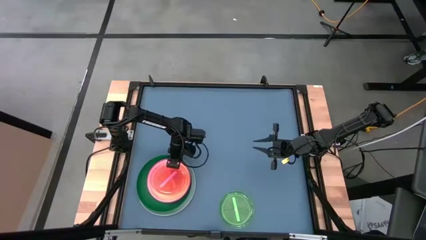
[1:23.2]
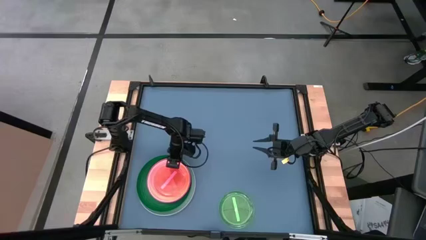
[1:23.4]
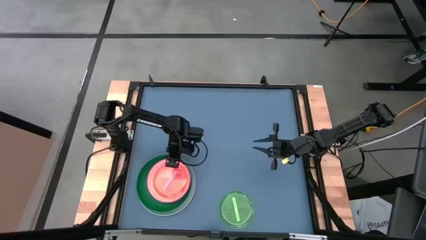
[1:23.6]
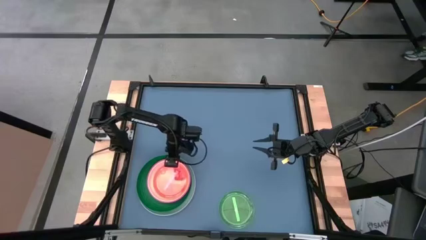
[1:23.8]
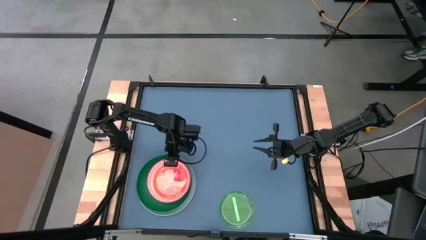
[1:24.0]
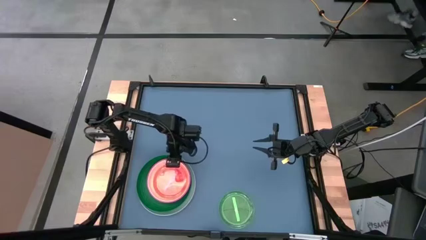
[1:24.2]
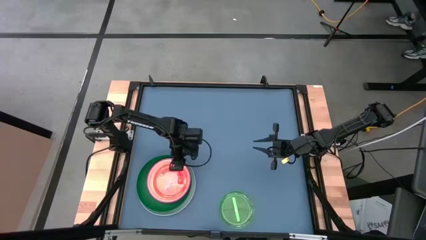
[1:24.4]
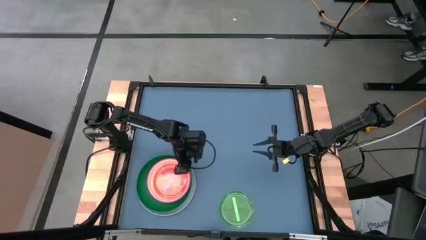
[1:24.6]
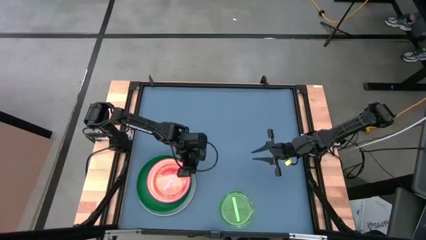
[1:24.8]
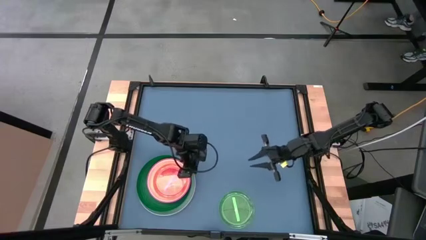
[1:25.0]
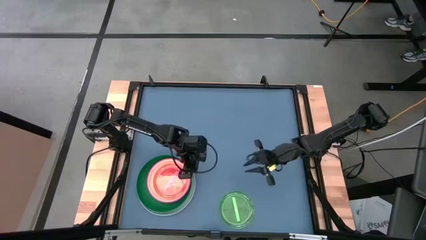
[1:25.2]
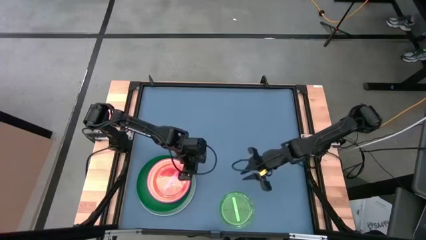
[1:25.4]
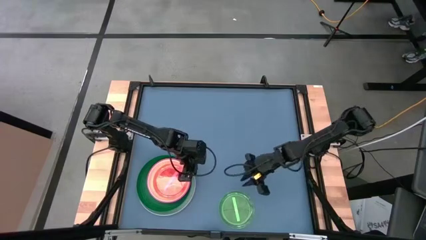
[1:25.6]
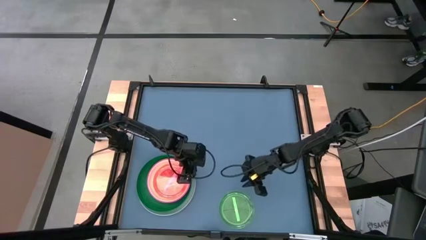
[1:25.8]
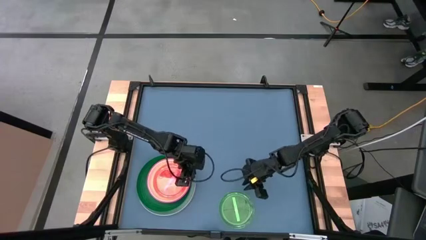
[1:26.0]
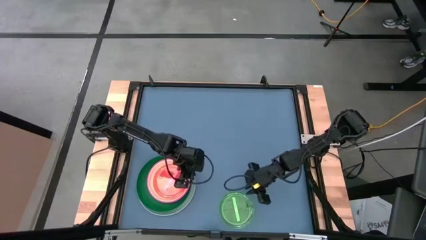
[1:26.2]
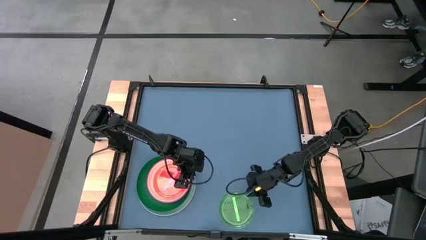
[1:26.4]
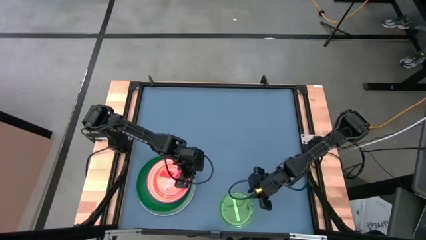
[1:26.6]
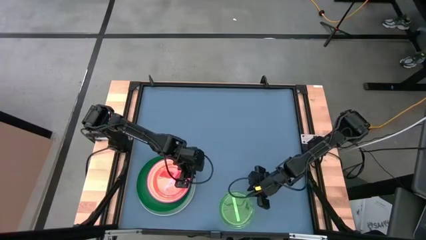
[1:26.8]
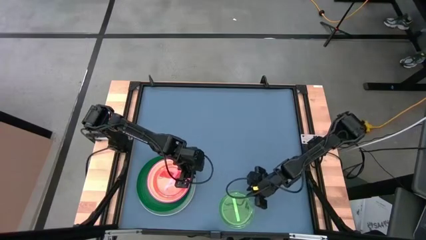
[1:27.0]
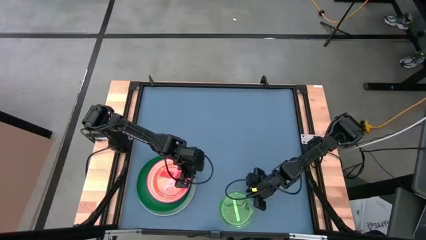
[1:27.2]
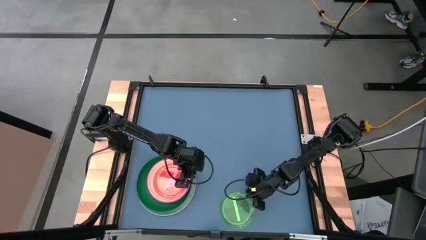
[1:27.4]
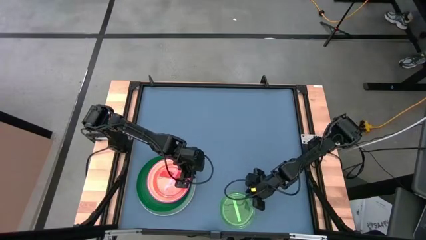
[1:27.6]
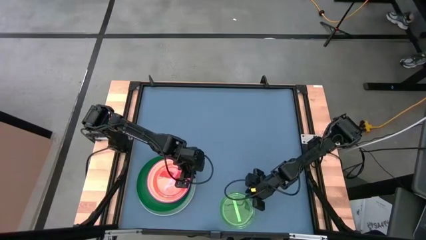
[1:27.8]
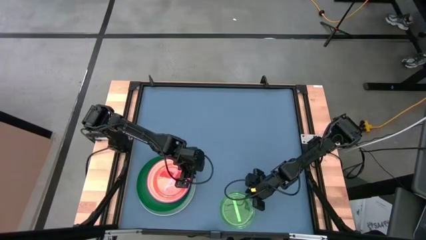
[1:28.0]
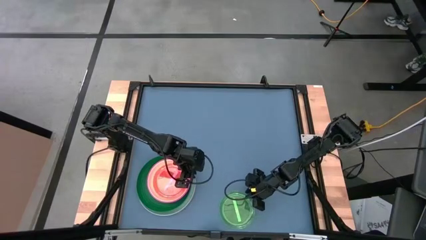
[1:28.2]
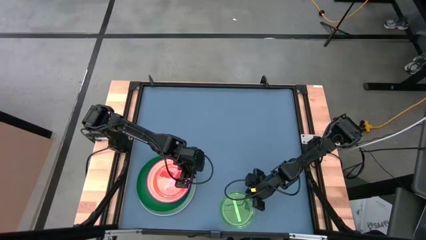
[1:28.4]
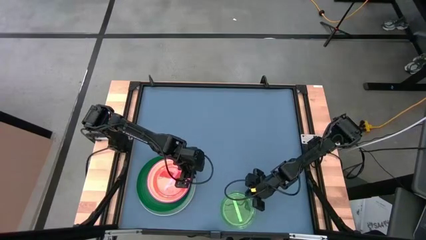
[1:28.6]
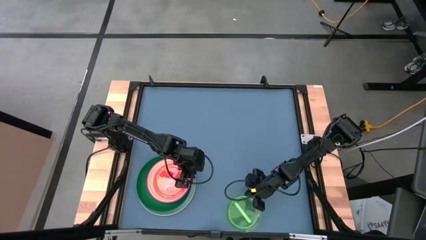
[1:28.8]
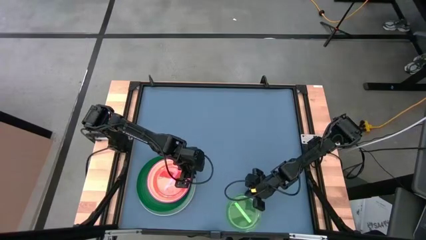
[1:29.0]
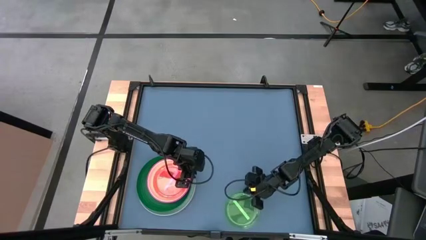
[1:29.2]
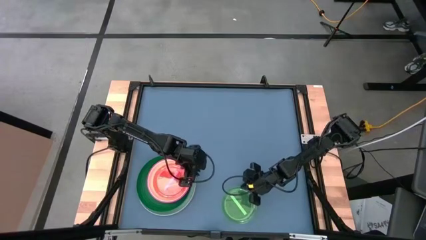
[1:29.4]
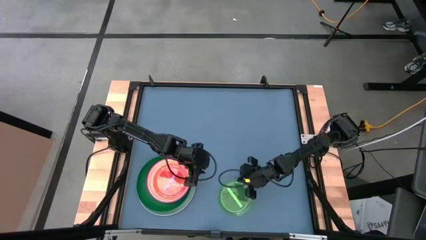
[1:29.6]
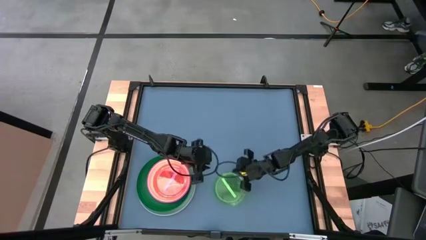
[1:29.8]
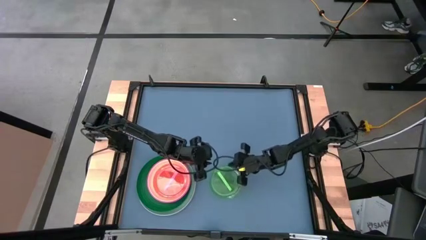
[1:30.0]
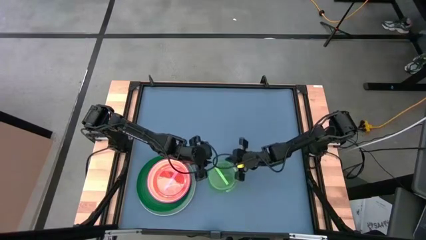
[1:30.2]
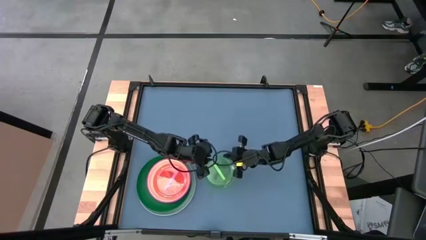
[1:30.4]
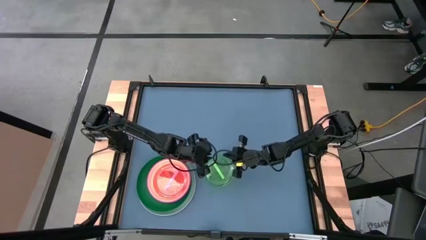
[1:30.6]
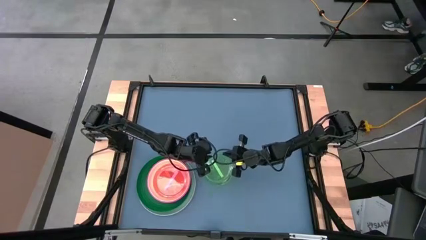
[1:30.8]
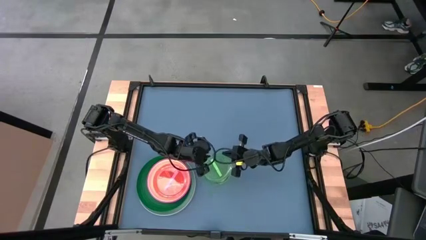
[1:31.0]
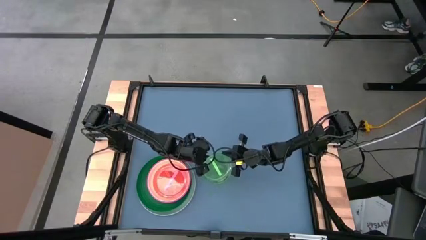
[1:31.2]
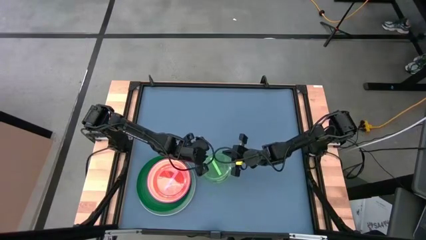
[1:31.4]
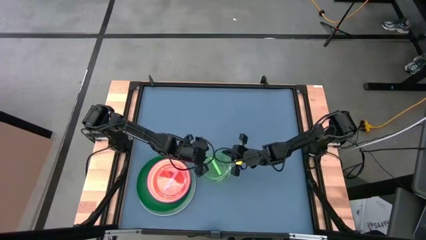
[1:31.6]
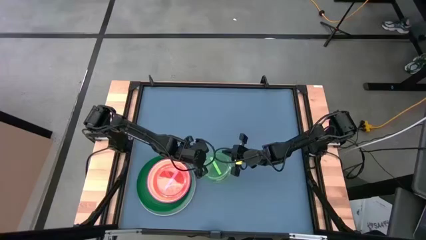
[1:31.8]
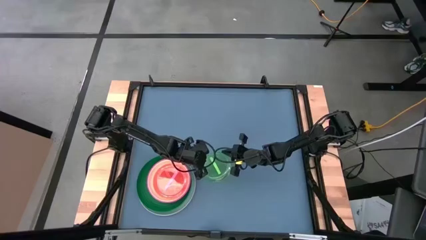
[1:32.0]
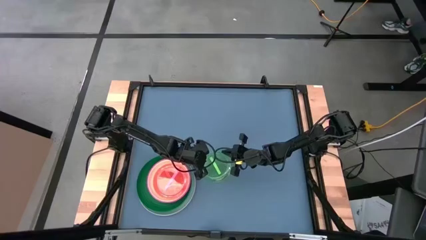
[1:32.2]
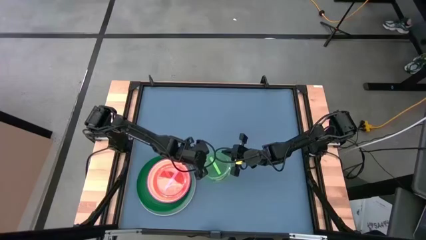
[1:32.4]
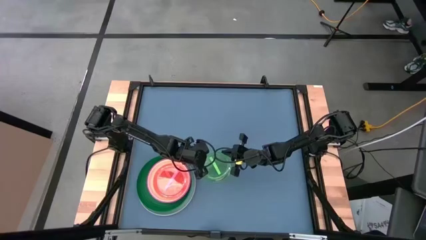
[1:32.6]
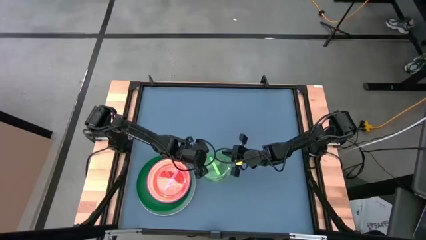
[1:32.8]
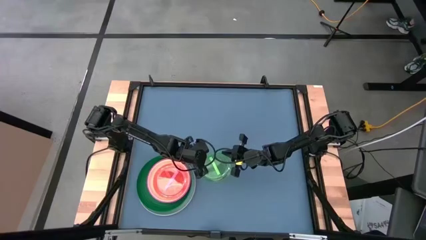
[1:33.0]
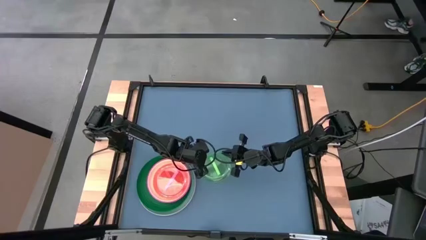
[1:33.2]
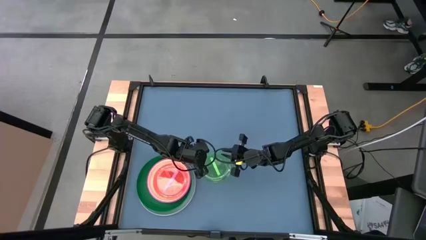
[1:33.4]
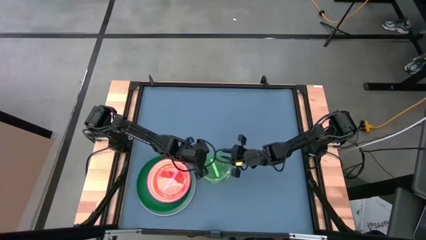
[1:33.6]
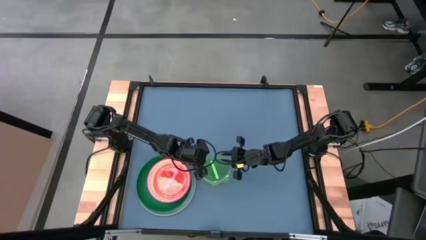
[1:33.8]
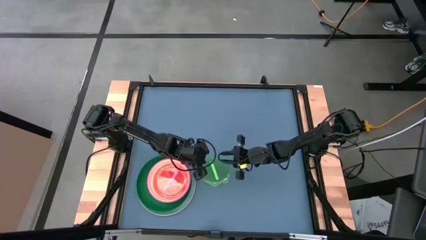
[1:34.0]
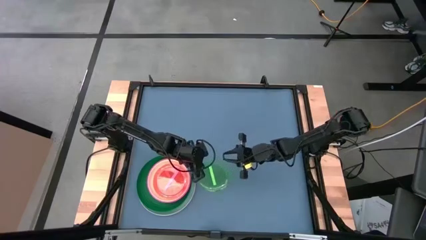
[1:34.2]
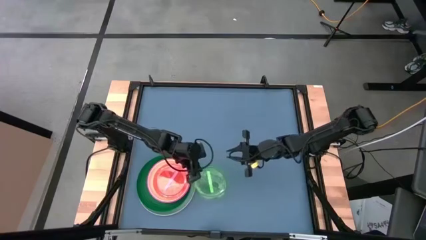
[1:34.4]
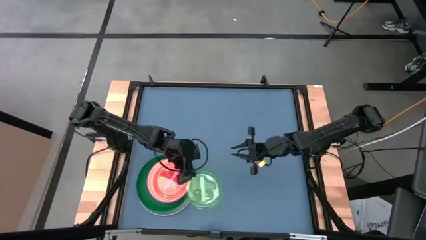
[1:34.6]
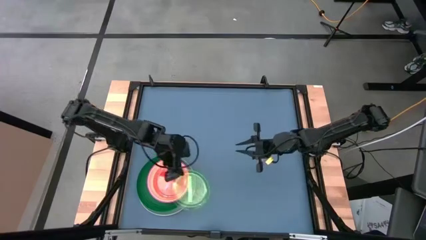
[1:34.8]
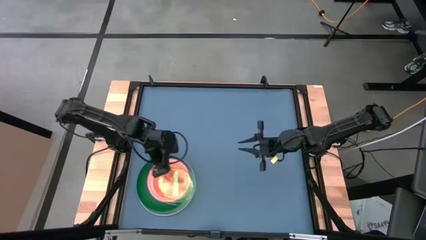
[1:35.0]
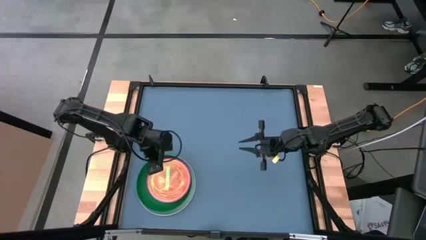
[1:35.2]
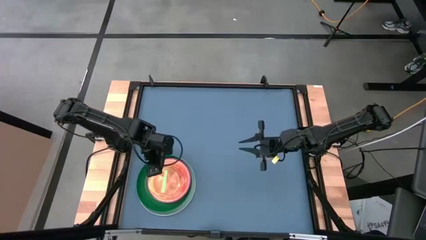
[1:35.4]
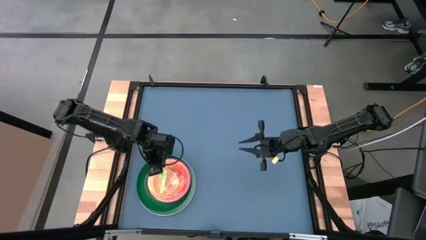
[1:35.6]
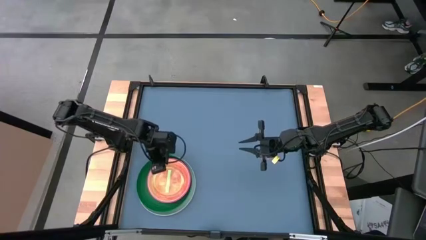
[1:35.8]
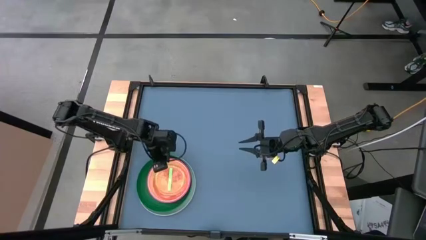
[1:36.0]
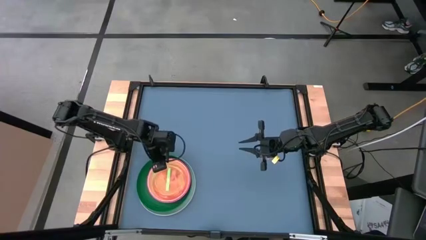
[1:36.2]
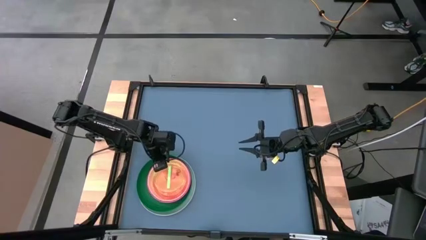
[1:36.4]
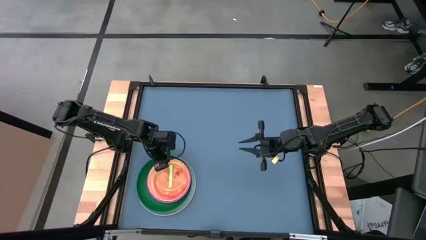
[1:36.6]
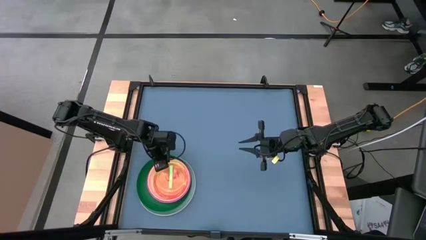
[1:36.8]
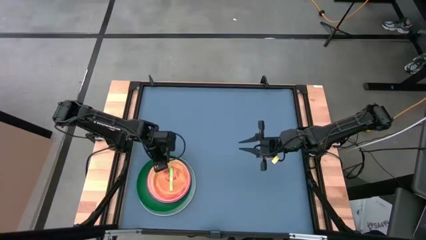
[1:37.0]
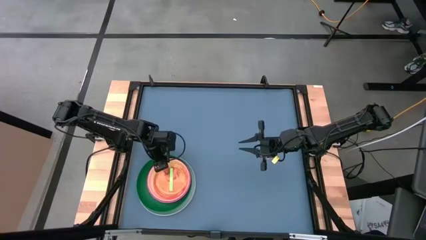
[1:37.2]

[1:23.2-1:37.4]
Task: Stack plastic plates
Stack the green plate on top of the pink plate

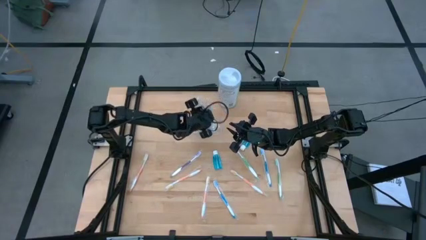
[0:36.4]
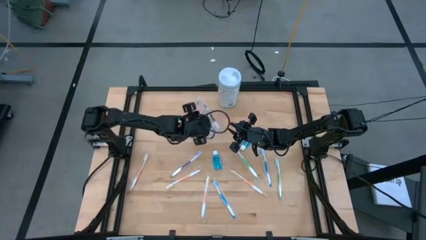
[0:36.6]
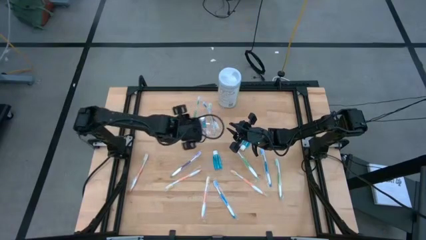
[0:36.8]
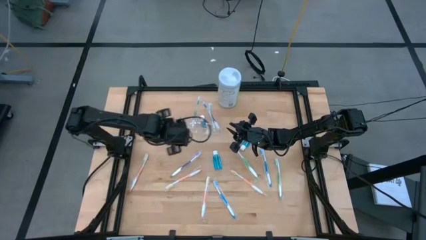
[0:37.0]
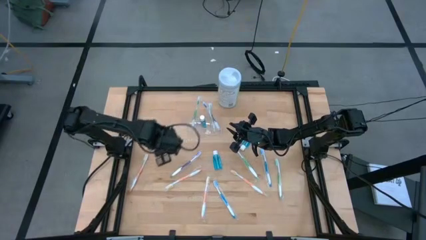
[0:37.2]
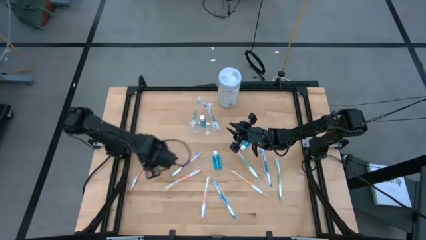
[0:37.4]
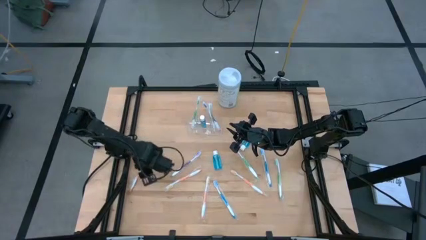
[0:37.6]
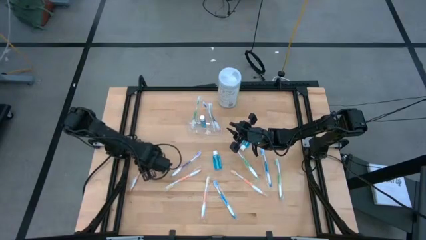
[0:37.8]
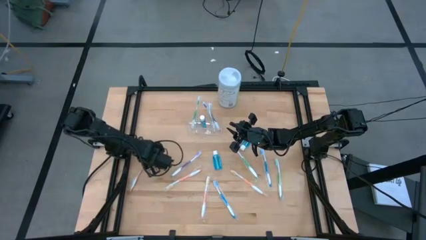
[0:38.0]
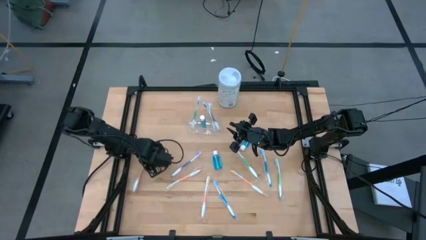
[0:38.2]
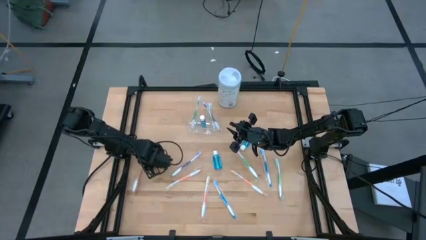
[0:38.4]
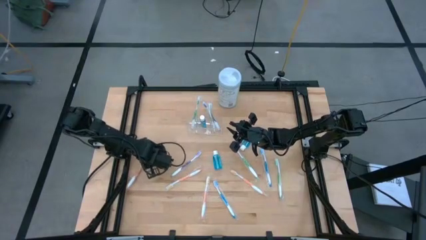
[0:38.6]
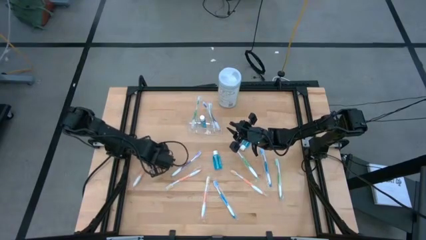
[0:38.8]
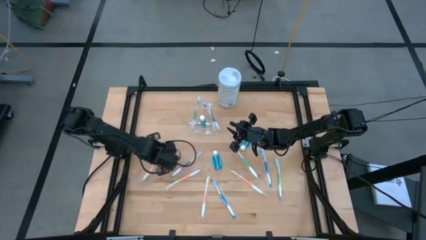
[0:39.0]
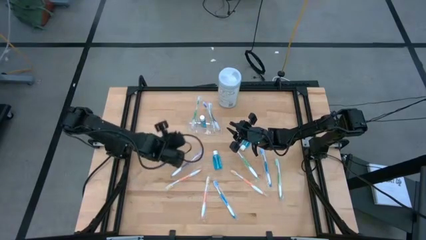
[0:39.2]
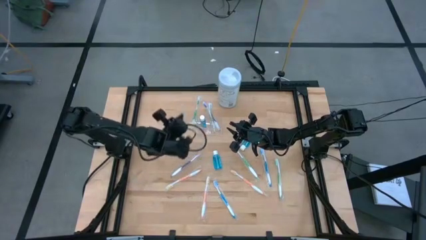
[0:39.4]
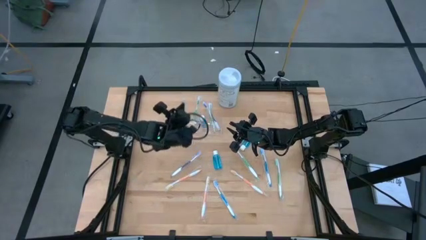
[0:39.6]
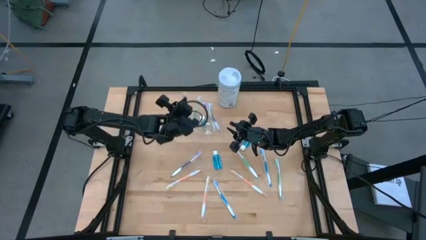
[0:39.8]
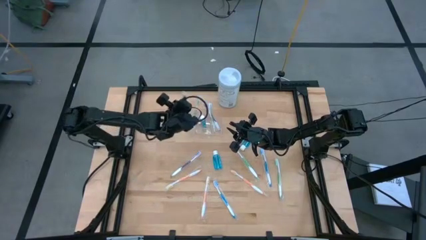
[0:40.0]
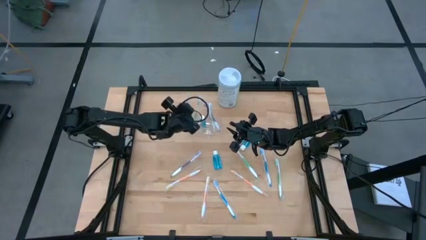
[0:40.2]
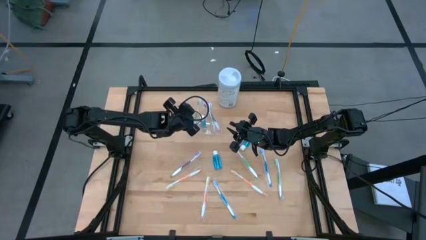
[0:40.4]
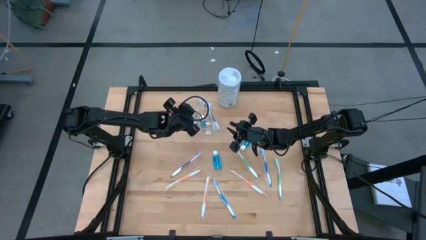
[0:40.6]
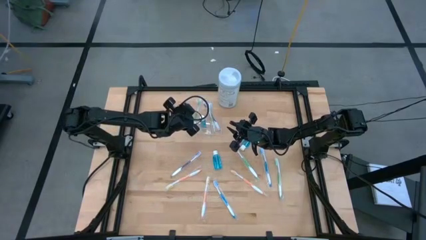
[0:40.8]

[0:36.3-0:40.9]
Task: Pick & Place toothbrushing station
Put the orange toothbrush into the transparent organizer
